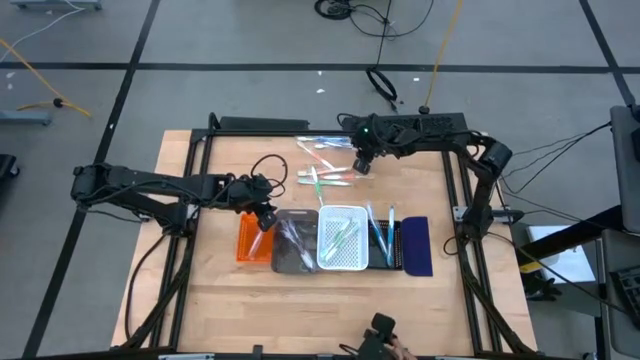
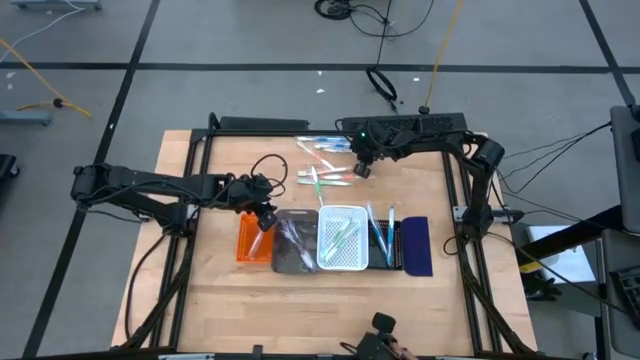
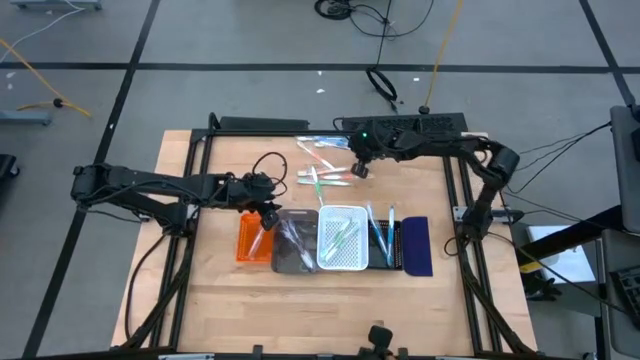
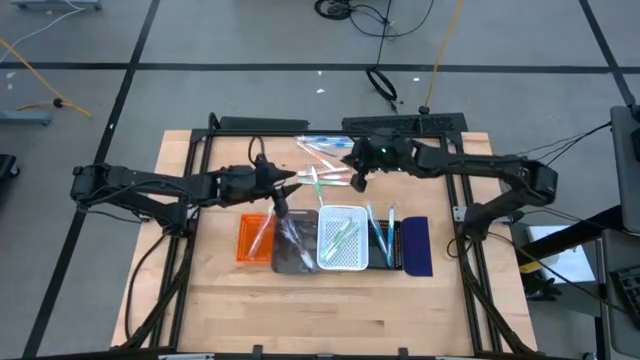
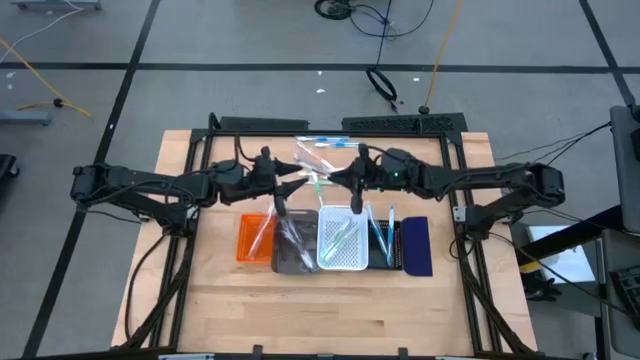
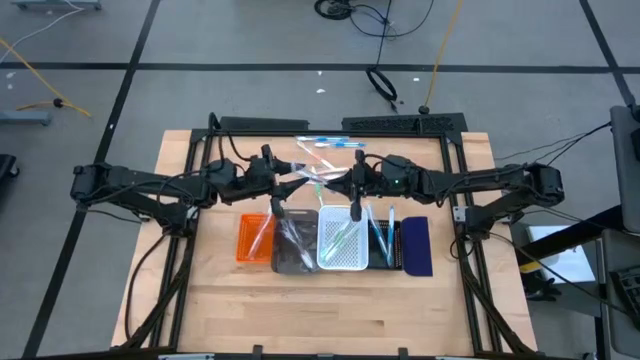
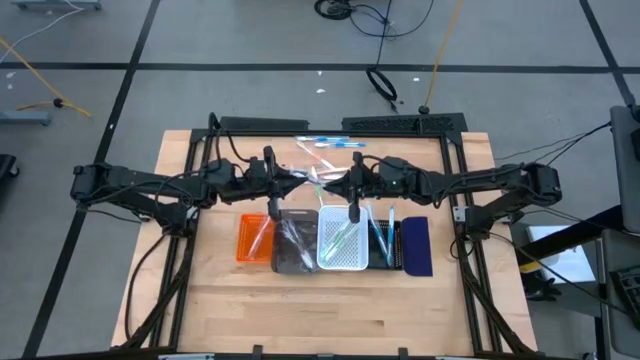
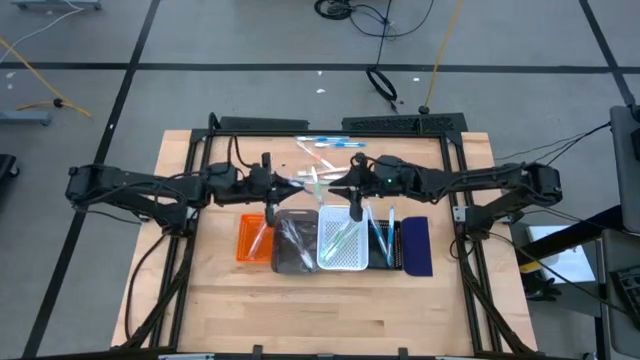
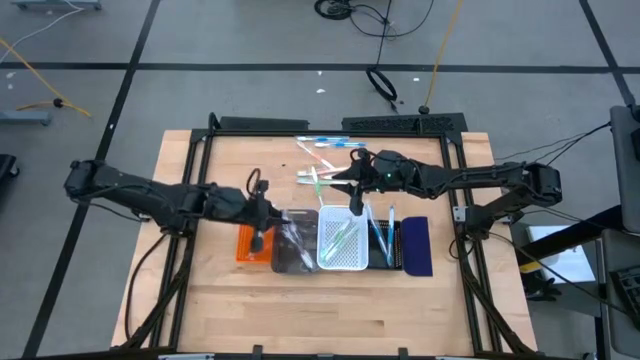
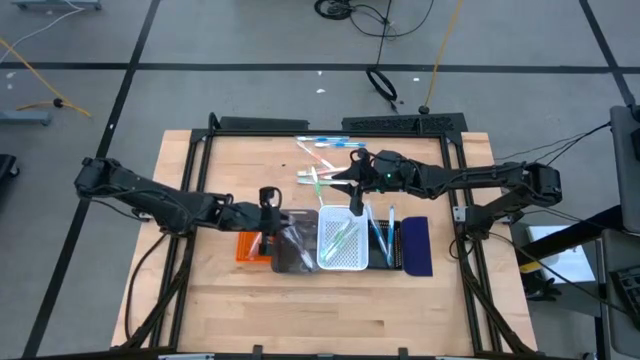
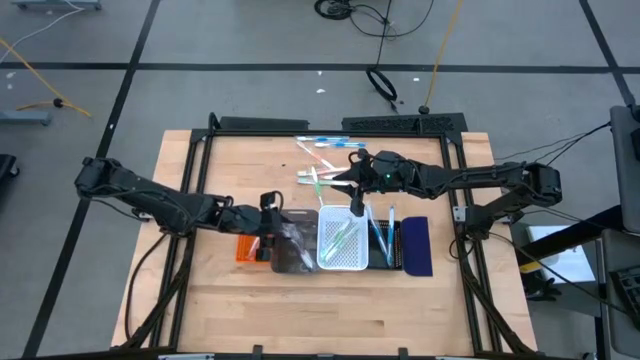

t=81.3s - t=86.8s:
Task: Pick & Place Toothbrushes
Put the purple toothbrush into the left black bin

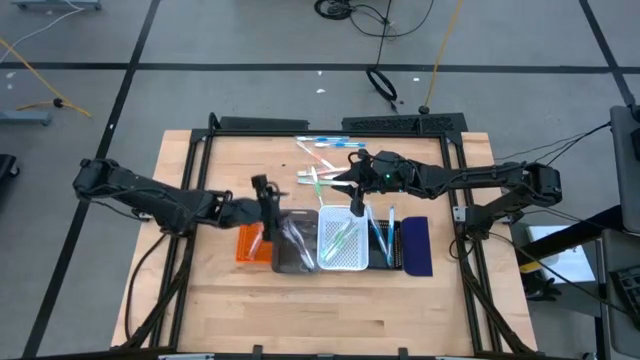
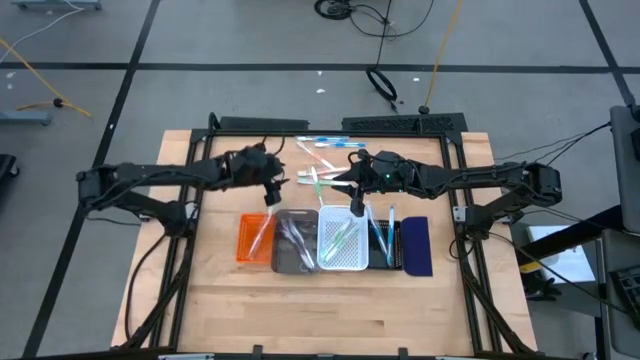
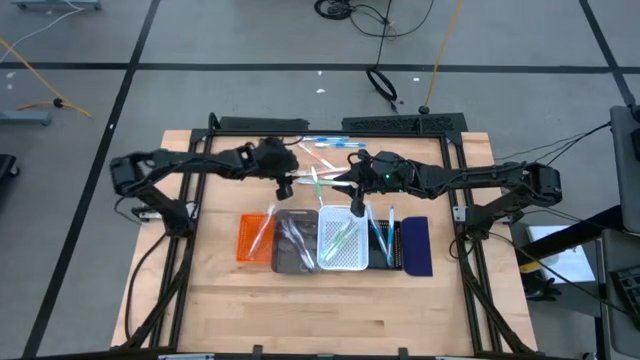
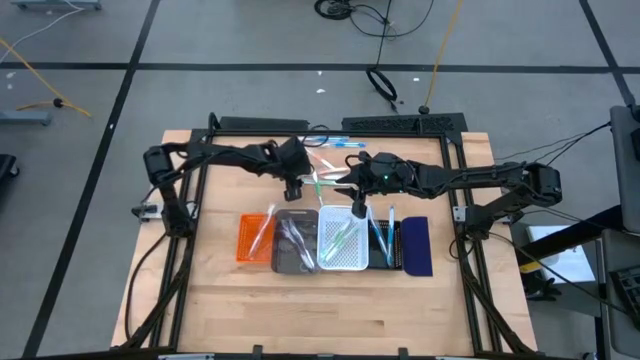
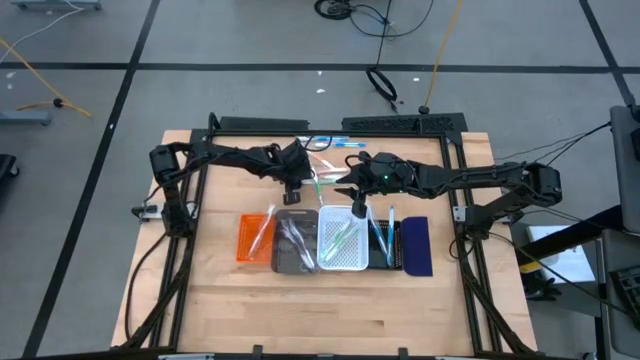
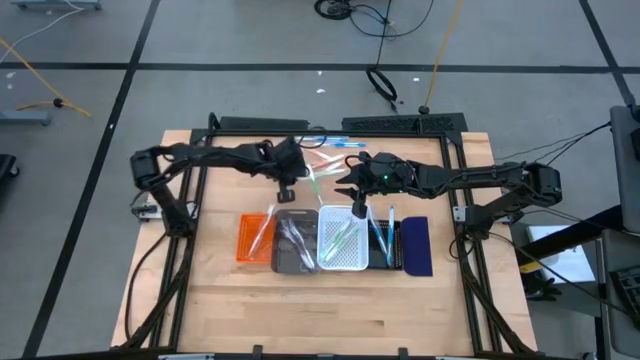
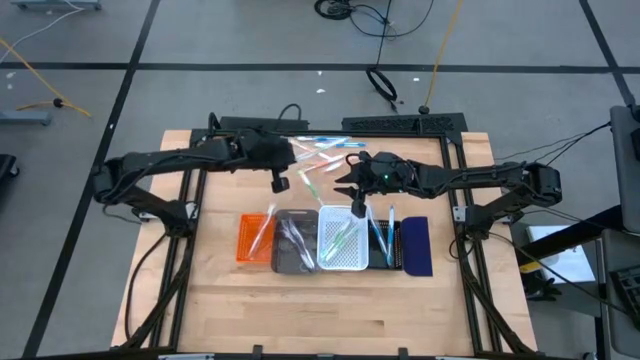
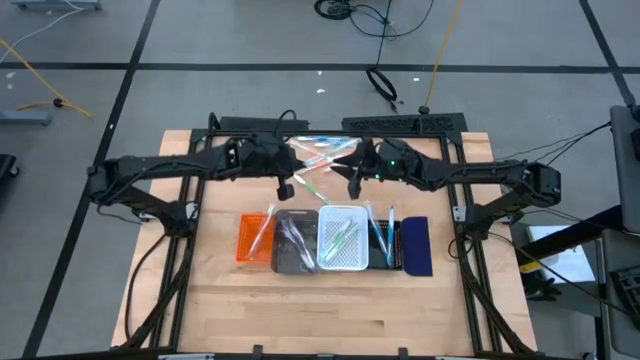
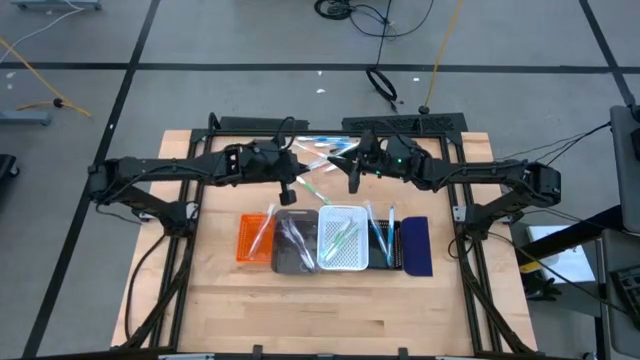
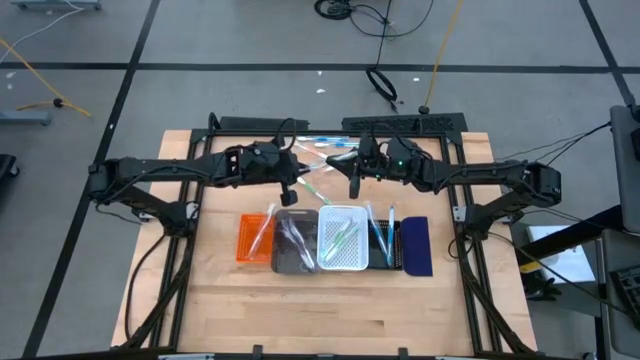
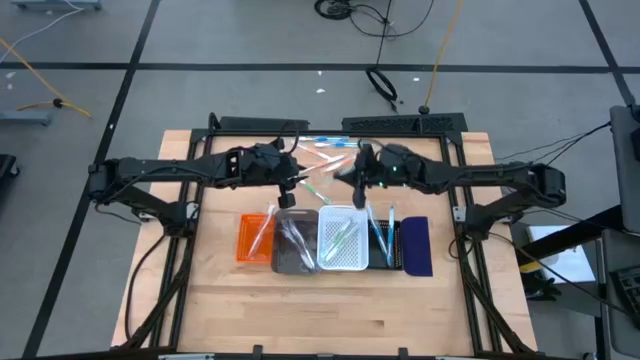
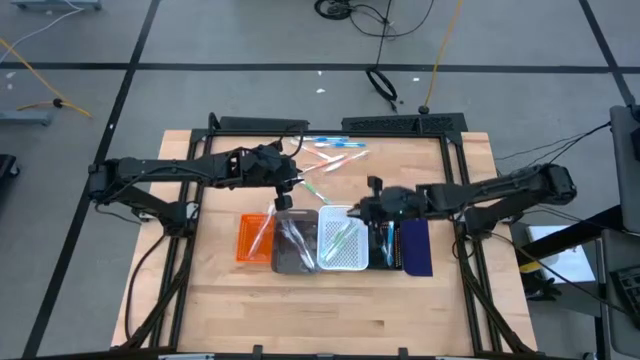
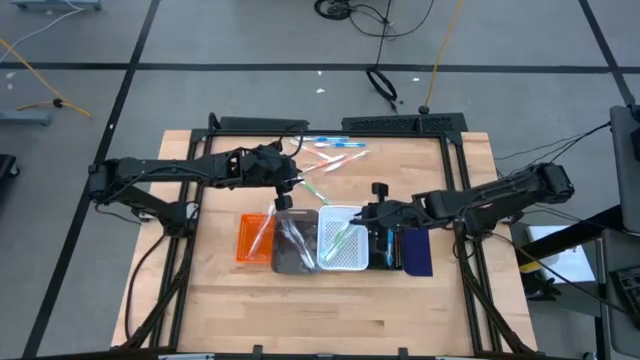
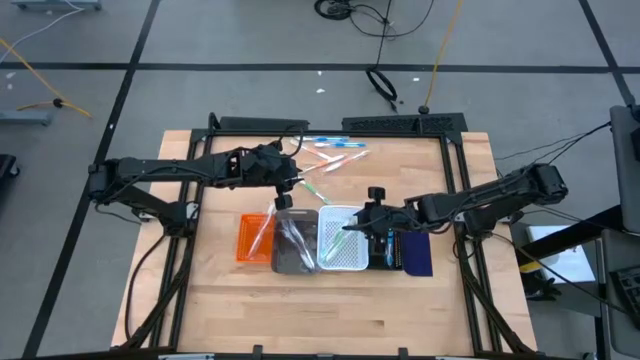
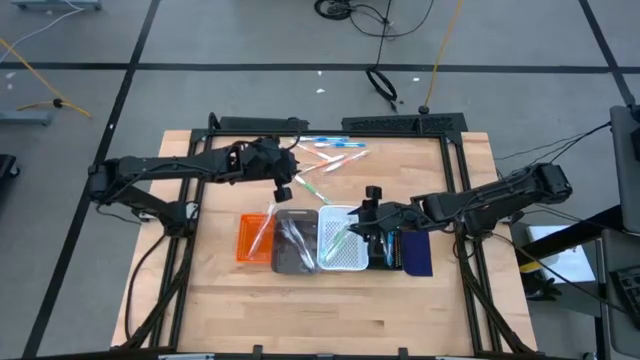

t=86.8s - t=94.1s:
Put the green toothbrush into the white bin

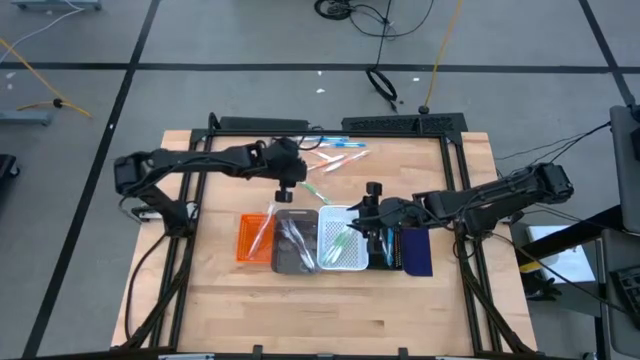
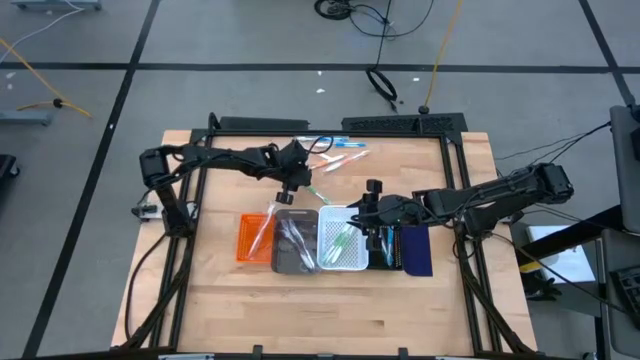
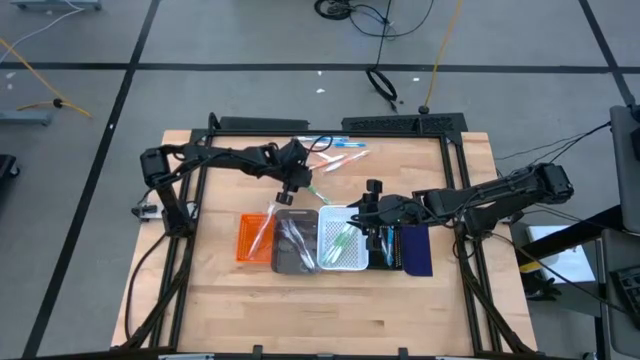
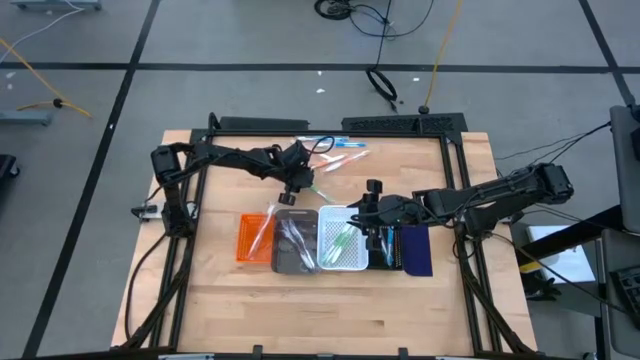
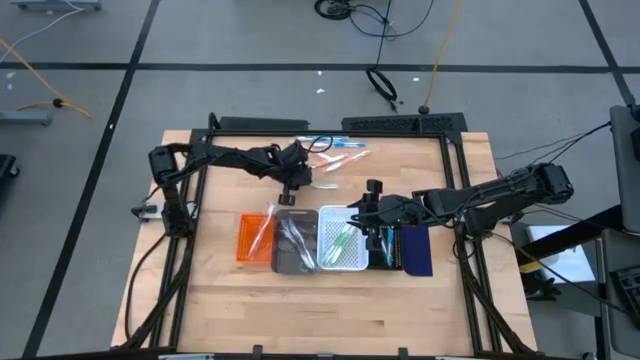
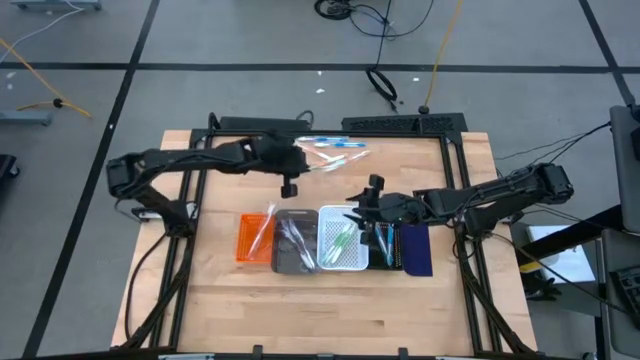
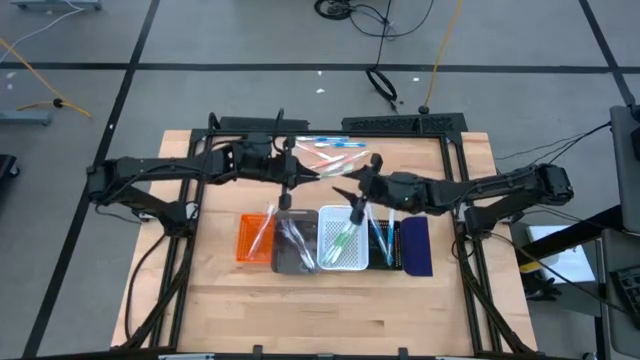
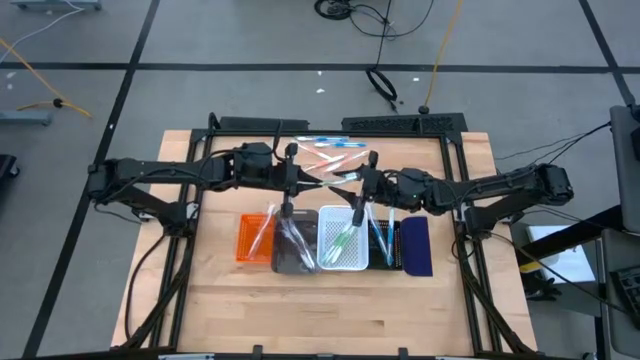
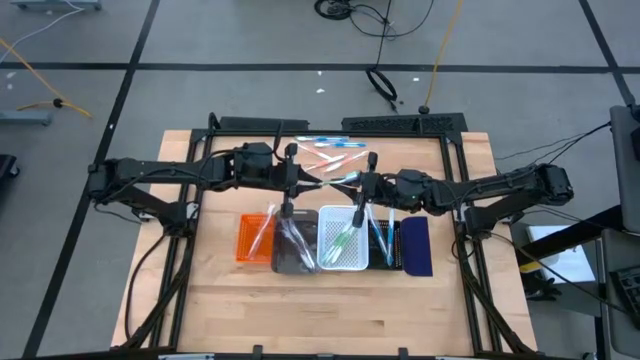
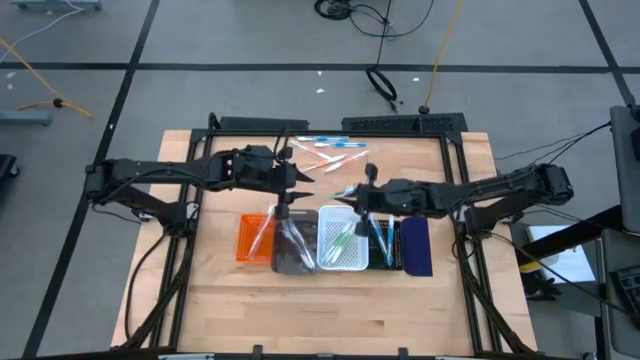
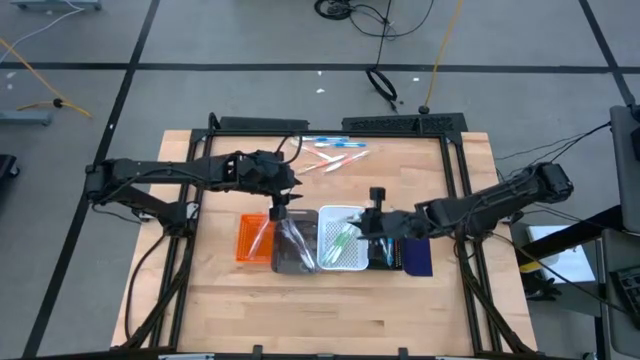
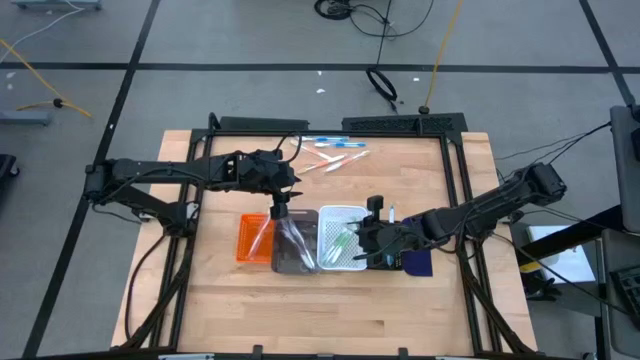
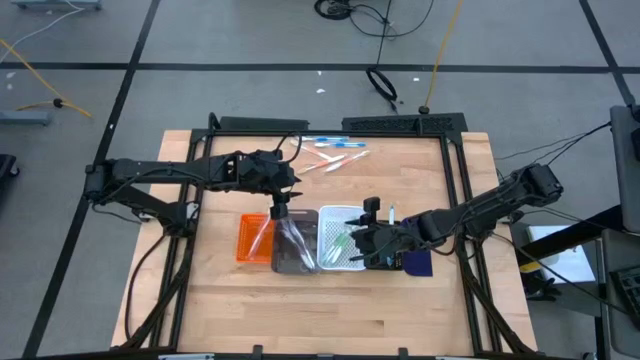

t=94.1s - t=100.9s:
Put the green toothbrush into the white bin

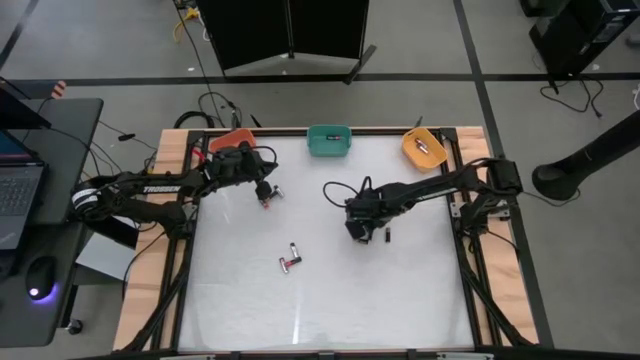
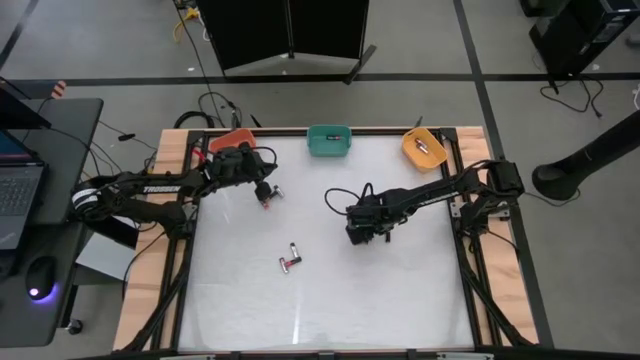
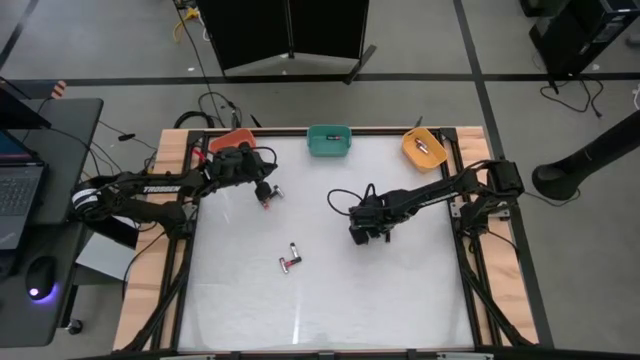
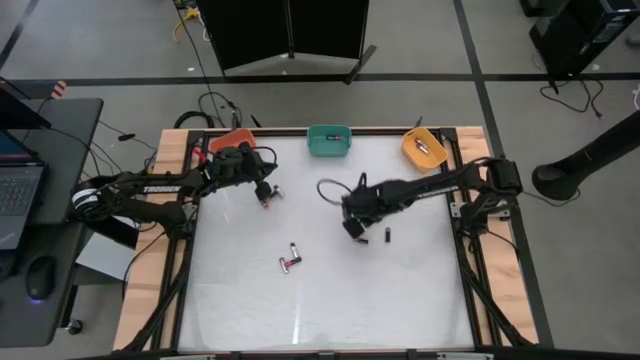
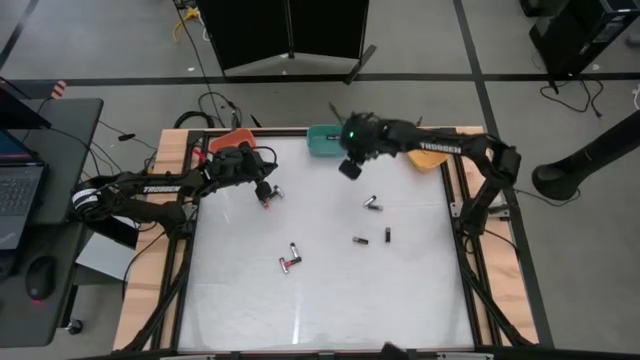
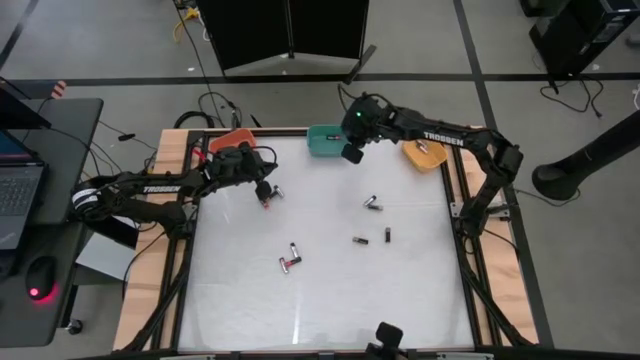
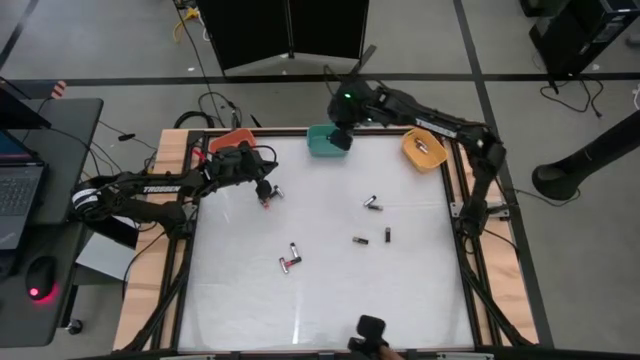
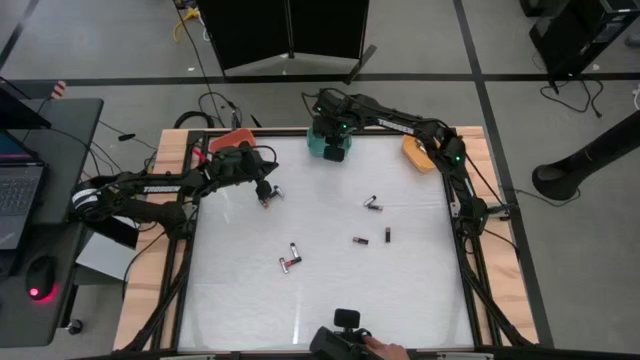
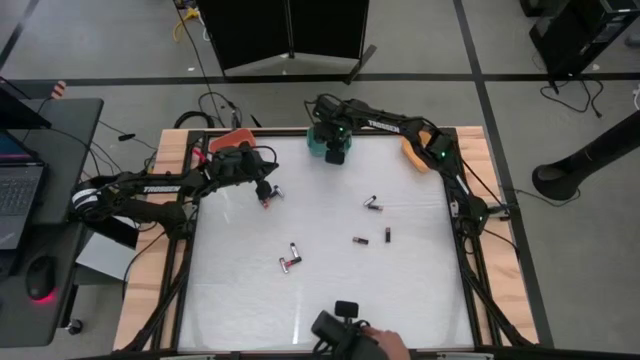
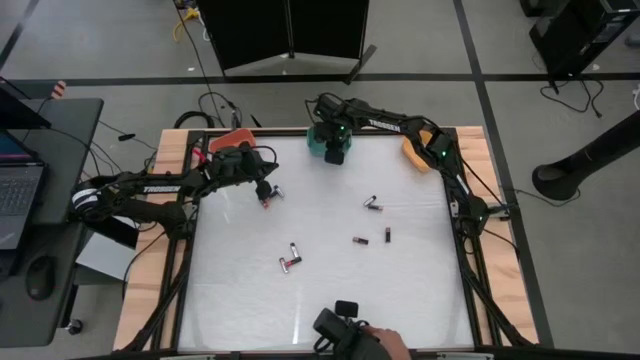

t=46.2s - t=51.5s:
Task: Sort batteries
Put the red battery into the yellow bin
